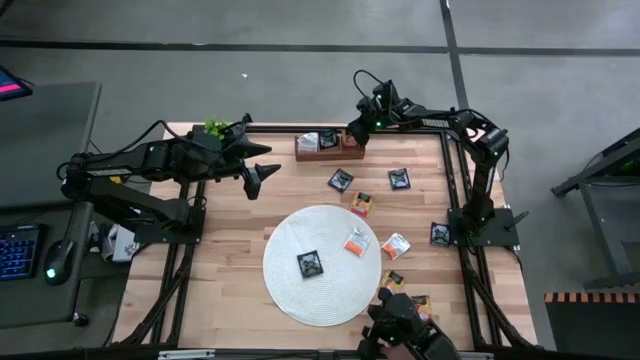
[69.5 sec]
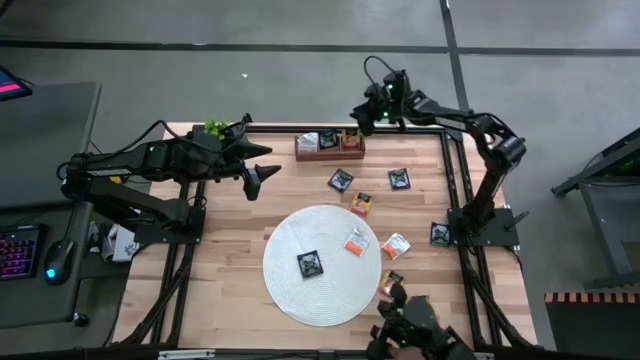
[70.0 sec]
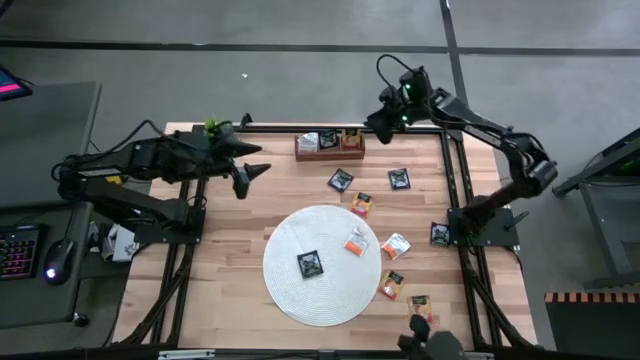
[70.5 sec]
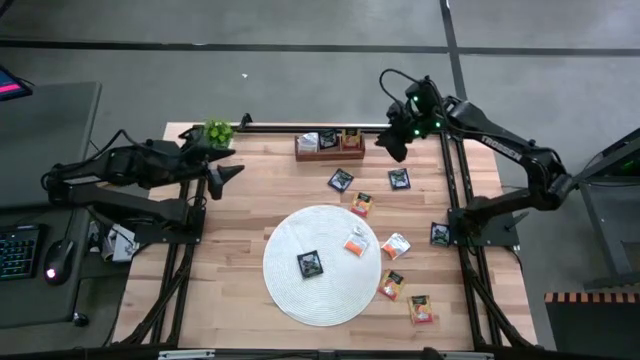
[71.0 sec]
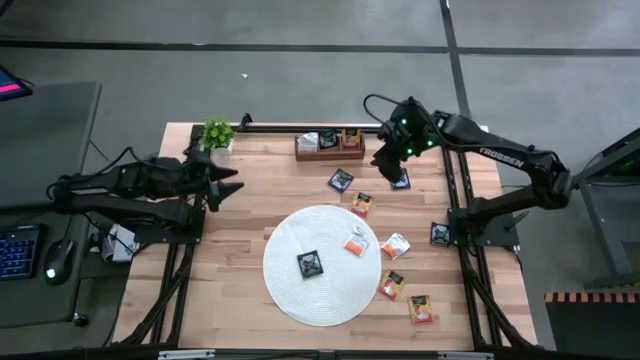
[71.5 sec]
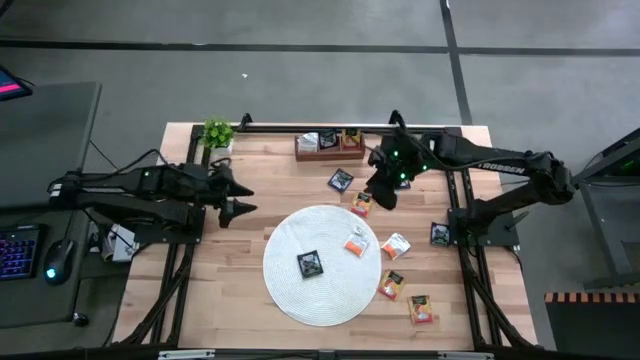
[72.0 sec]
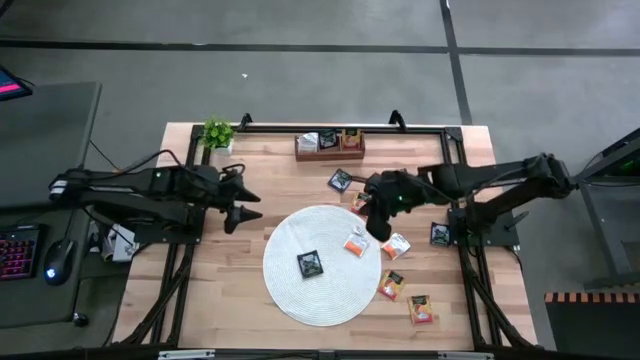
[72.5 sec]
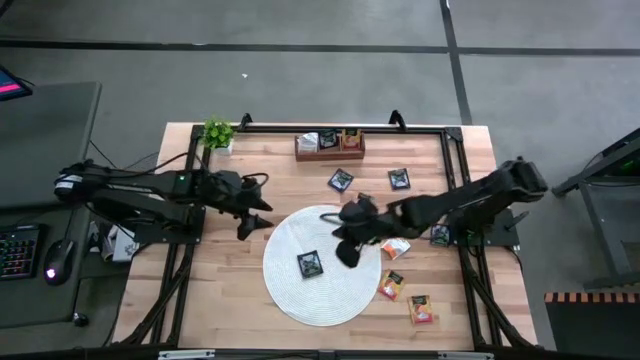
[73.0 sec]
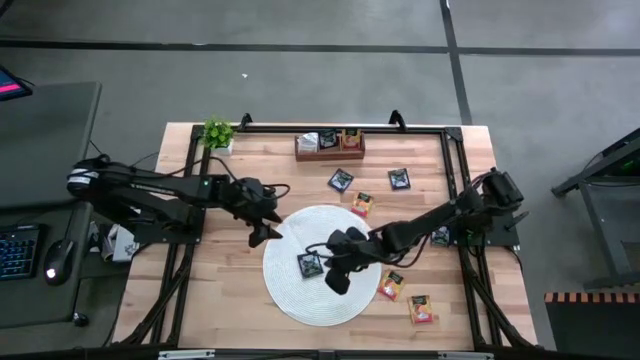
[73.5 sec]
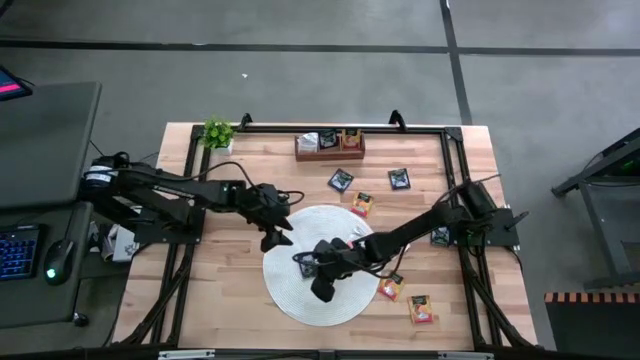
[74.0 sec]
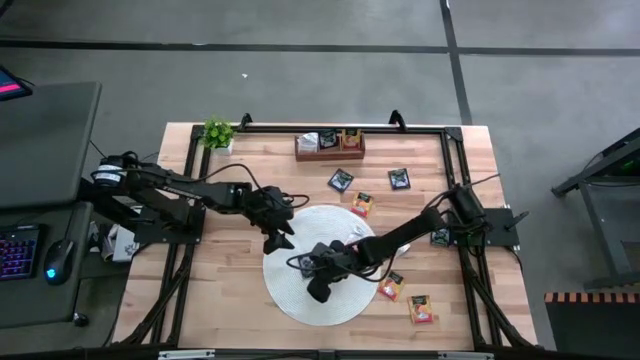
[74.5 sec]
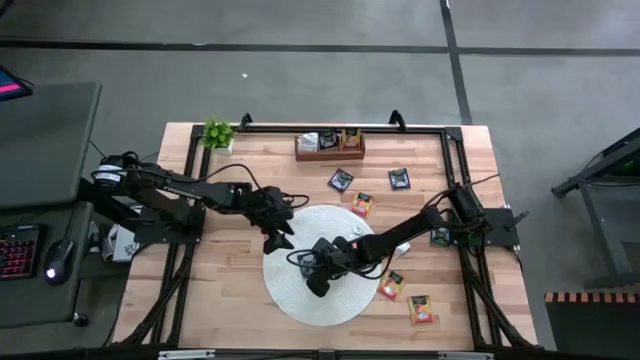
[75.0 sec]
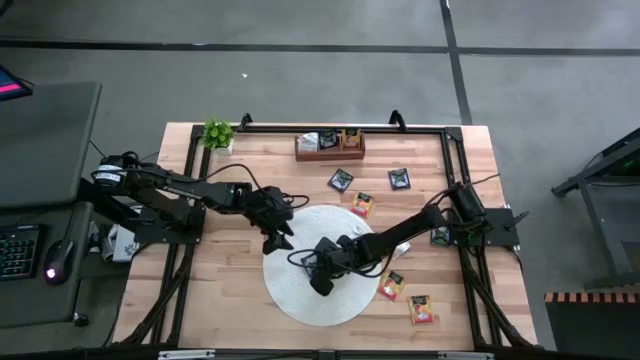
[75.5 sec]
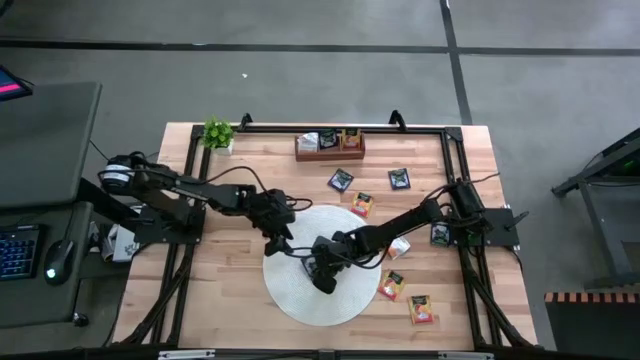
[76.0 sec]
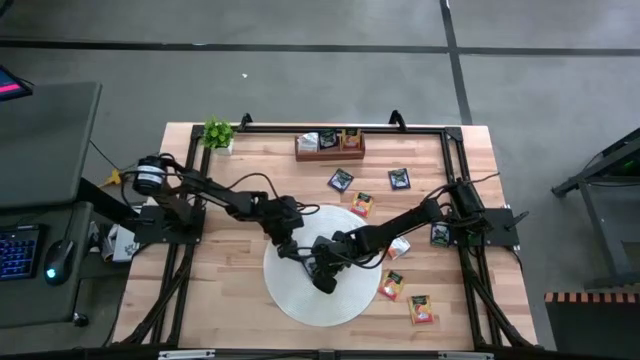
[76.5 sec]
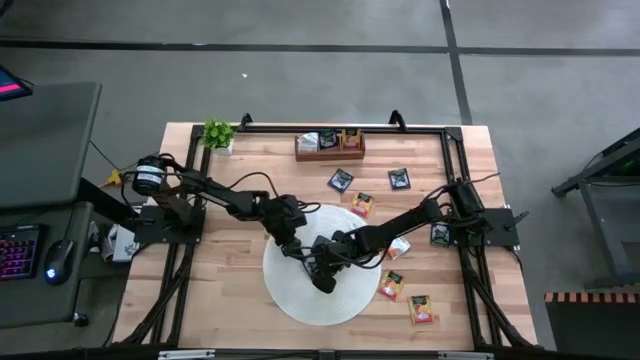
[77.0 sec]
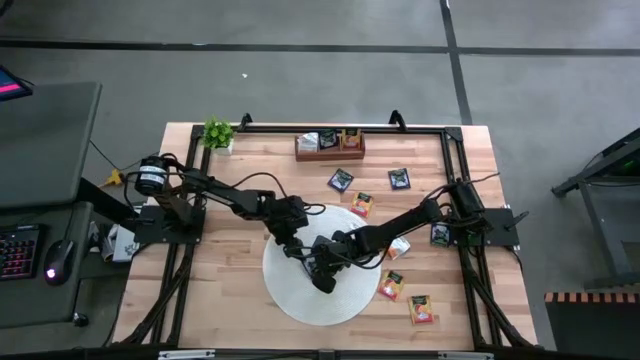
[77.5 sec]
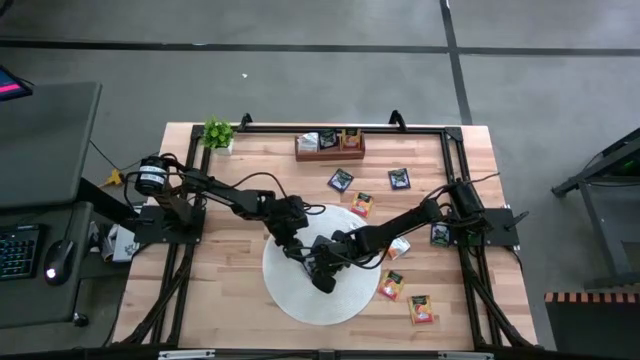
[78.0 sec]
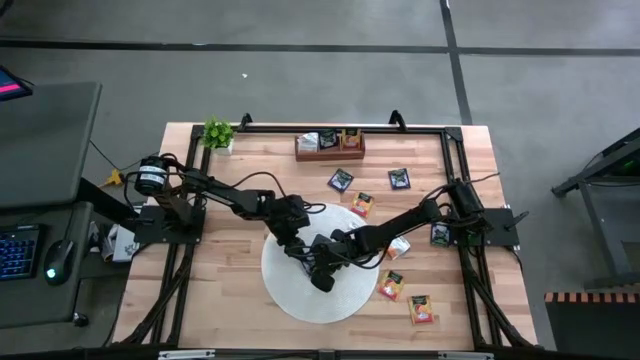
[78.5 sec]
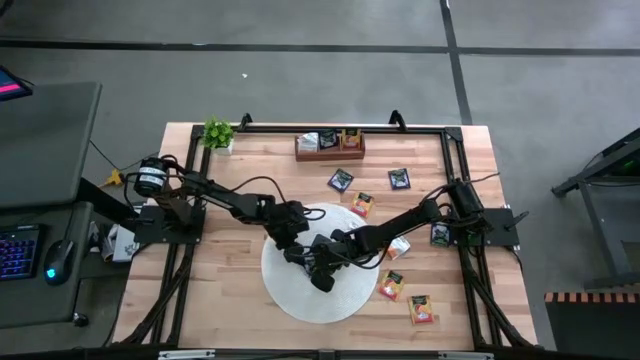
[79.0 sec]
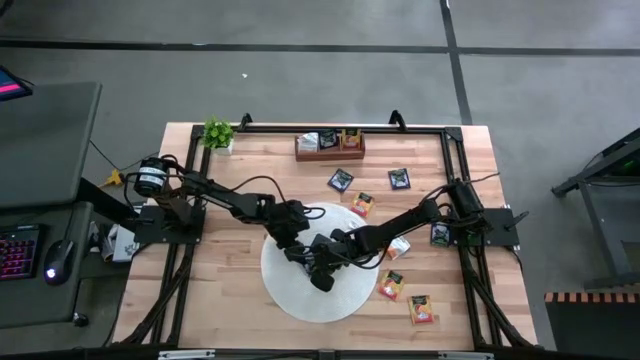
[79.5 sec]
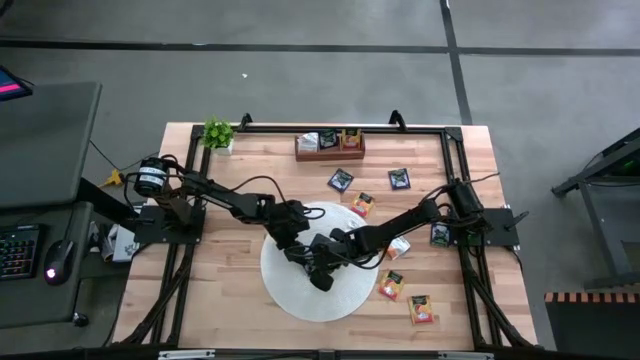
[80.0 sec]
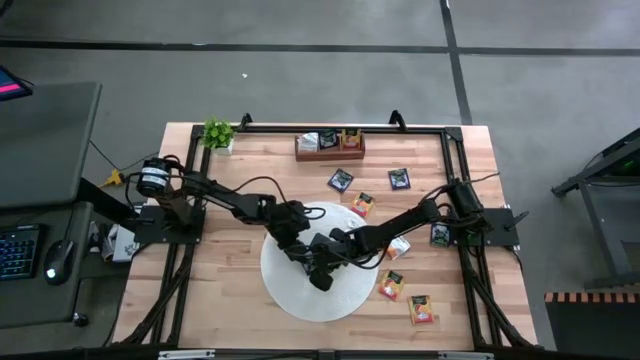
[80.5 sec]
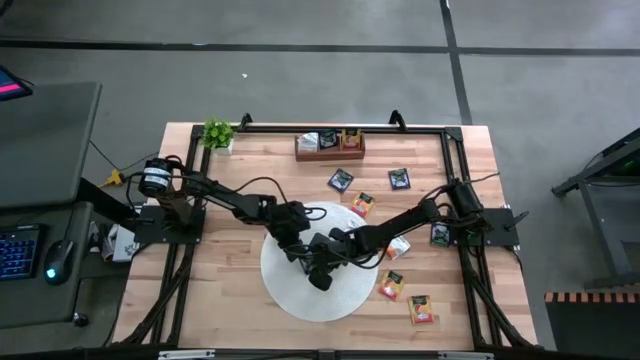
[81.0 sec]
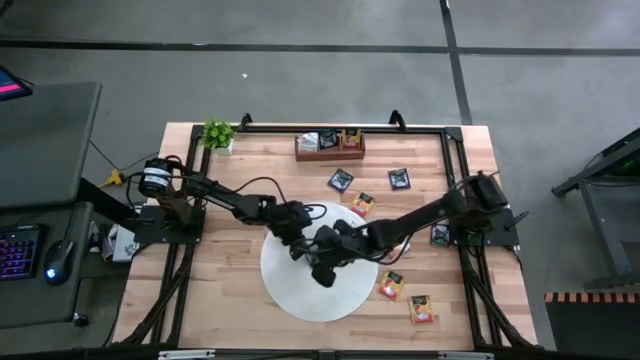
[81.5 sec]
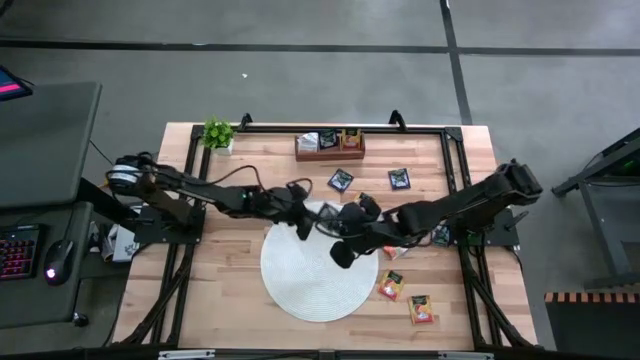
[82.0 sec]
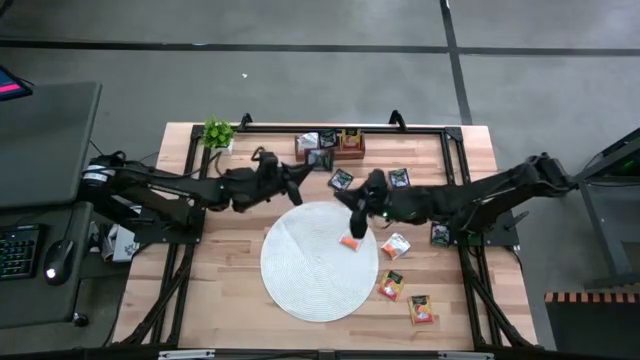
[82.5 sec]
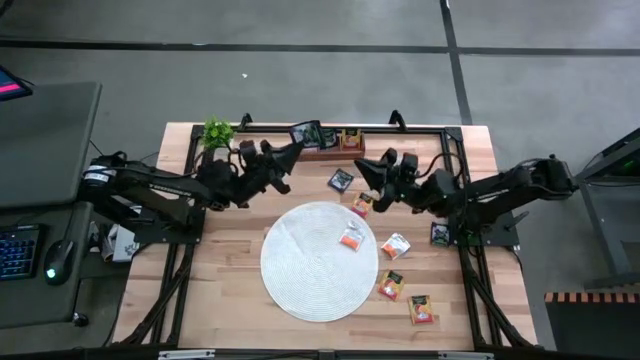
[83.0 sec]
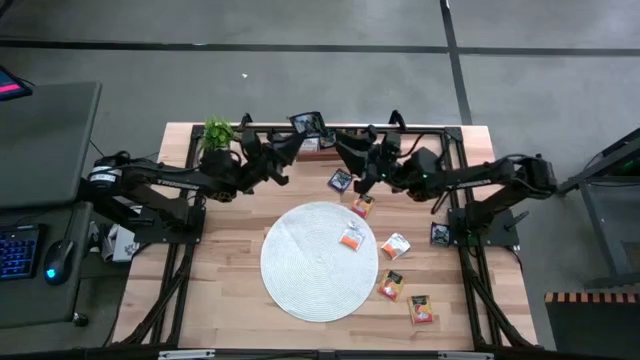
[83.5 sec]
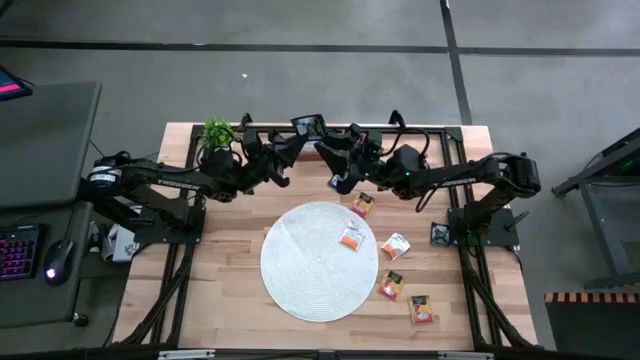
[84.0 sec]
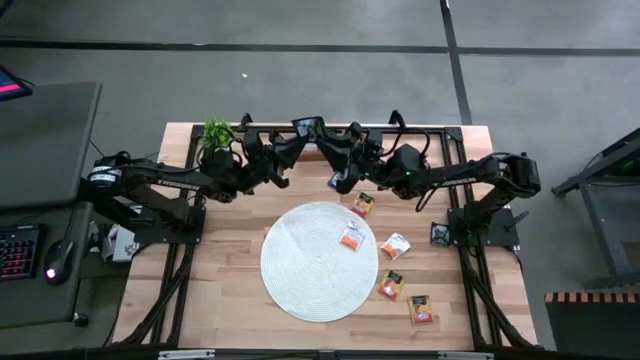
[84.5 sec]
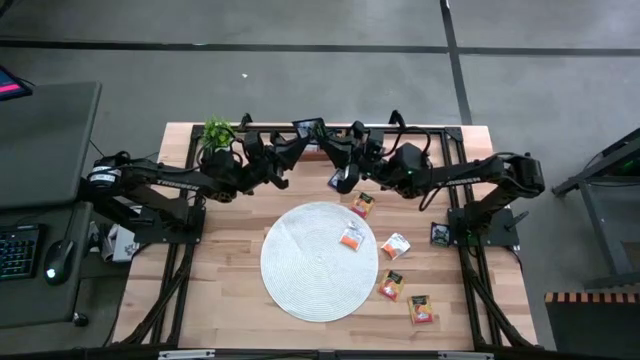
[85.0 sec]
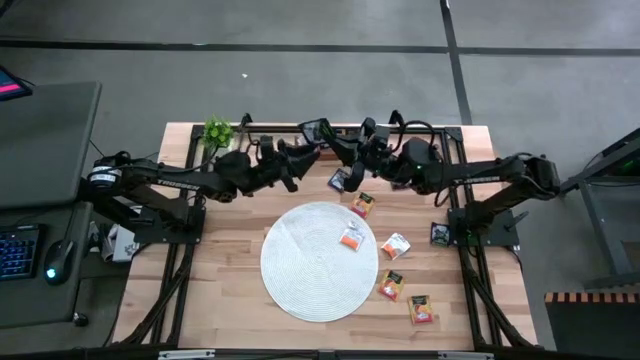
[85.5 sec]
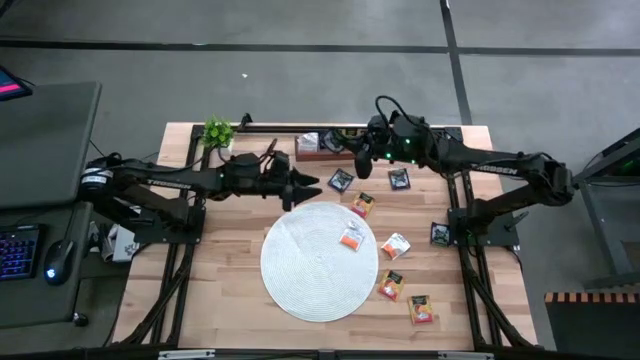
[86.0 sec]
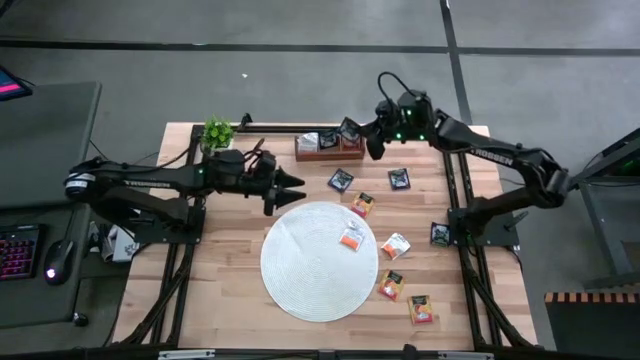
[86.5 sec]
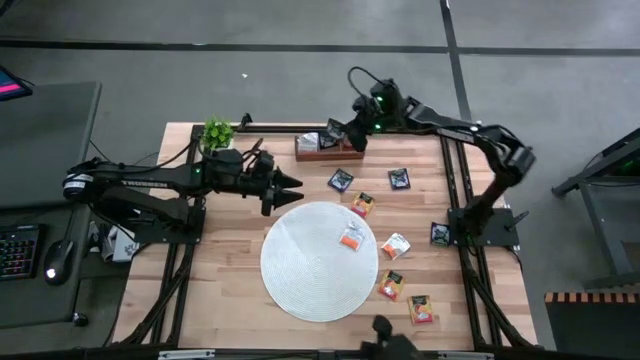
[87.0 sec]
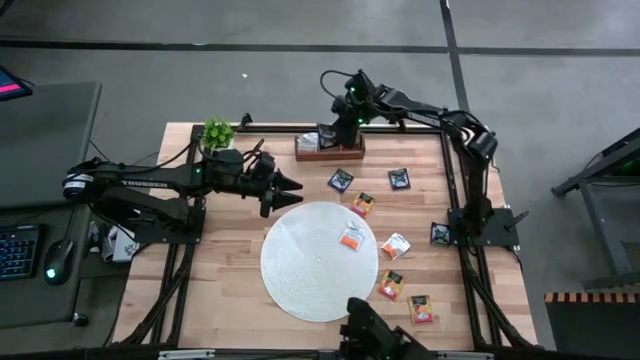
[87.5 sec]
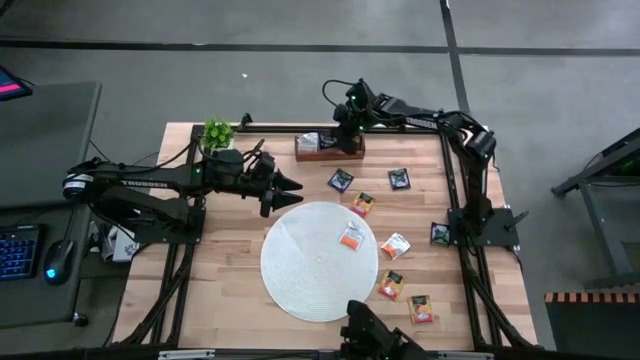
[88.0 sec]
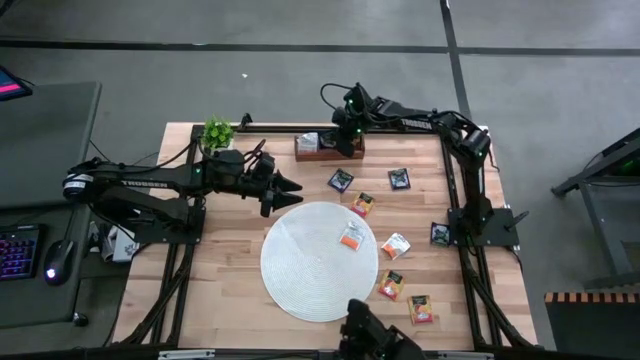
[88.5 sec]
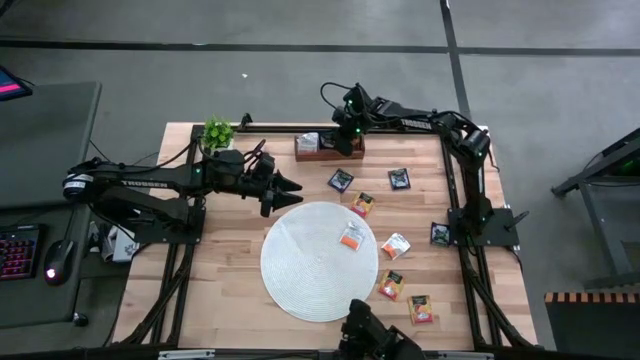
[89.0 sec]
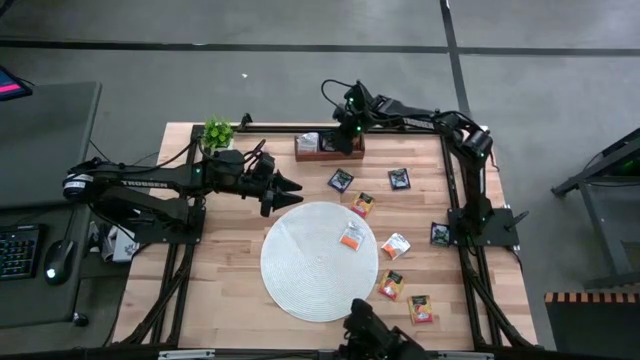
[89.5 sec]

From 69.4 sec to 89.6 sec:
Task: Pick & Place Tea
Put the blue tea bag into the middle section of the wooden organizer
